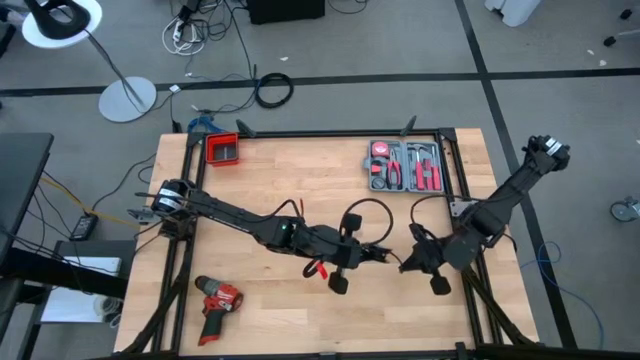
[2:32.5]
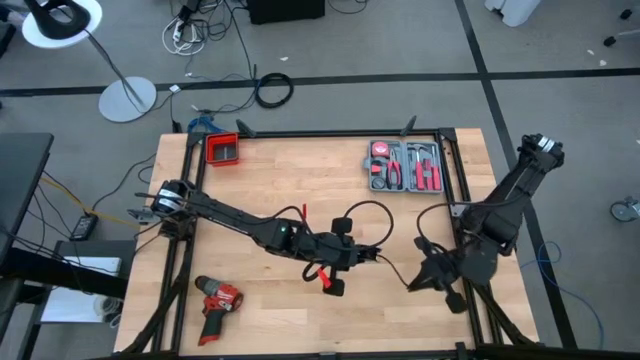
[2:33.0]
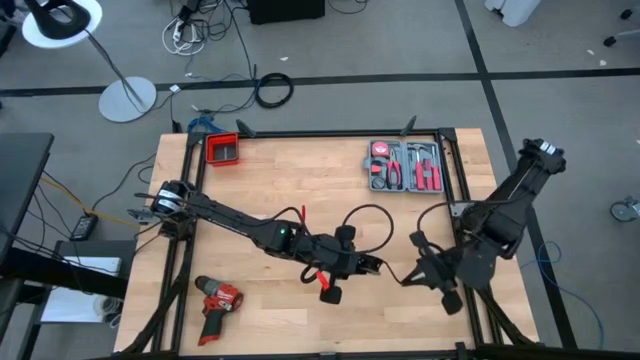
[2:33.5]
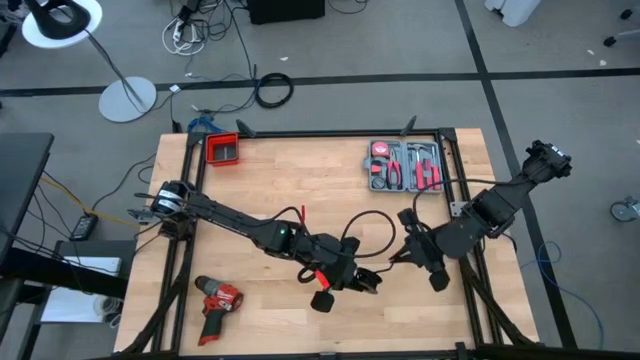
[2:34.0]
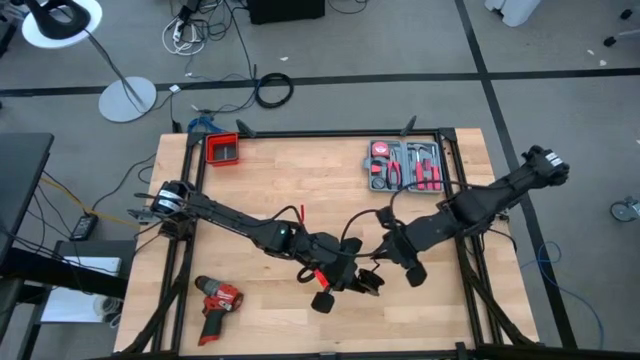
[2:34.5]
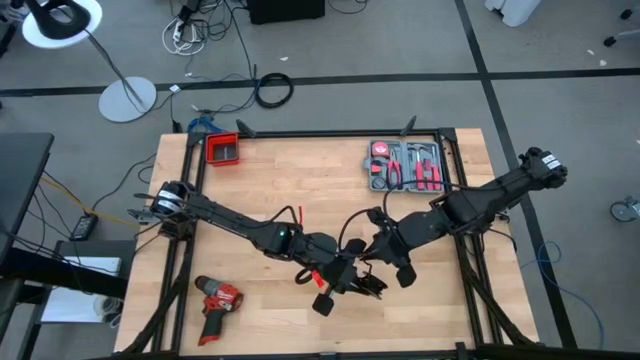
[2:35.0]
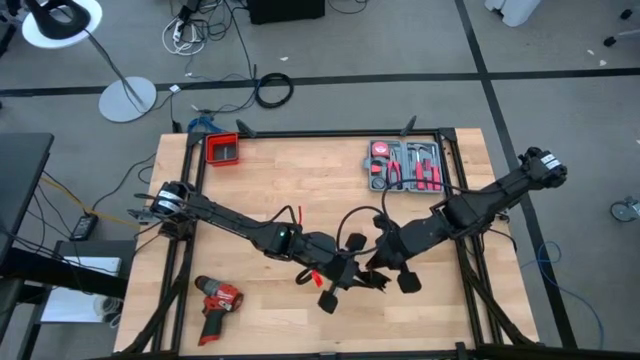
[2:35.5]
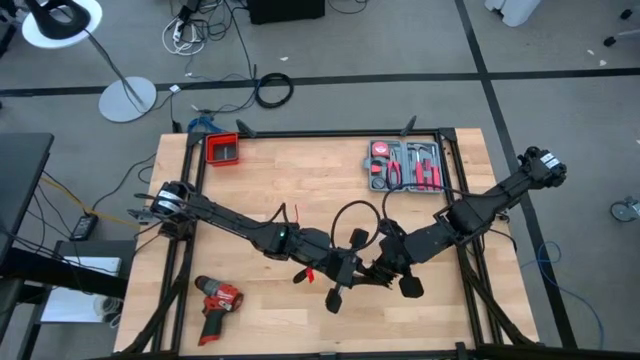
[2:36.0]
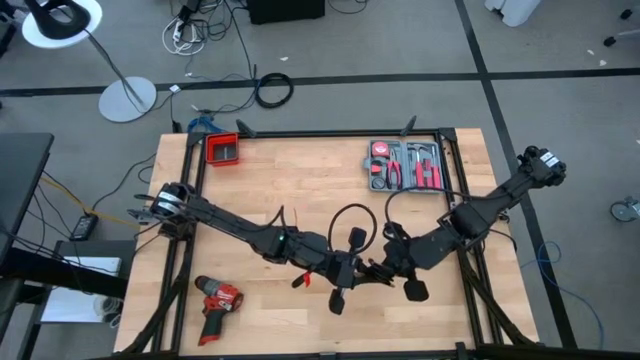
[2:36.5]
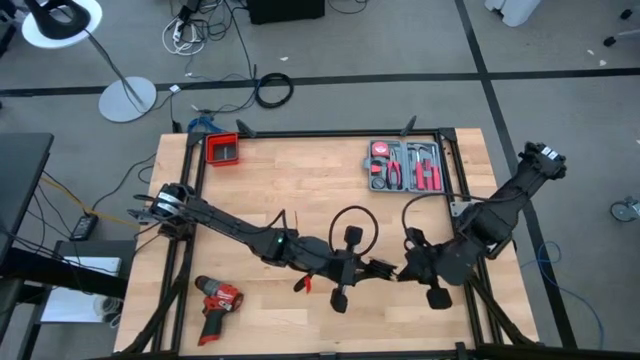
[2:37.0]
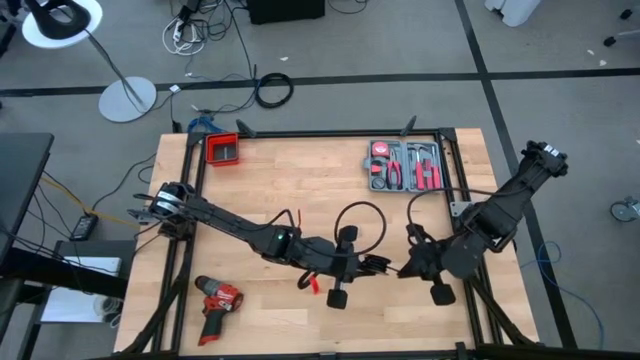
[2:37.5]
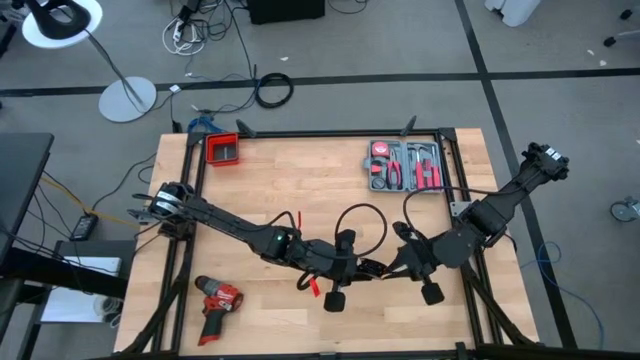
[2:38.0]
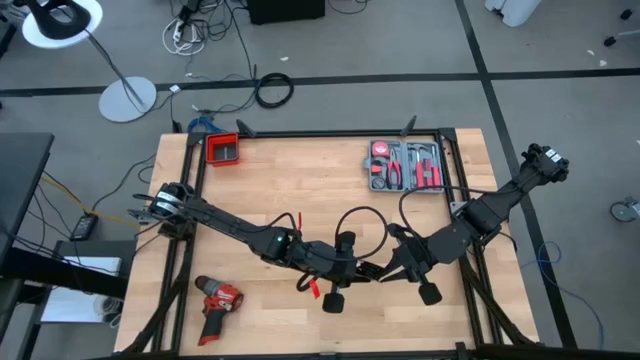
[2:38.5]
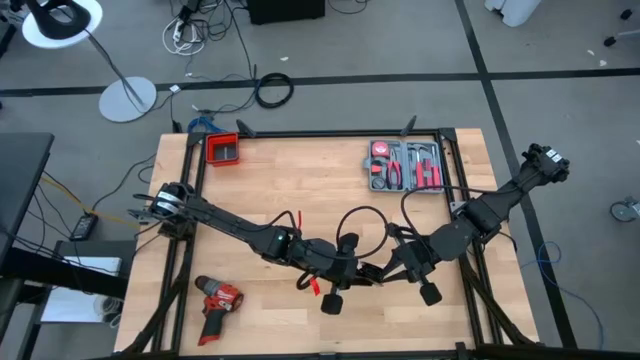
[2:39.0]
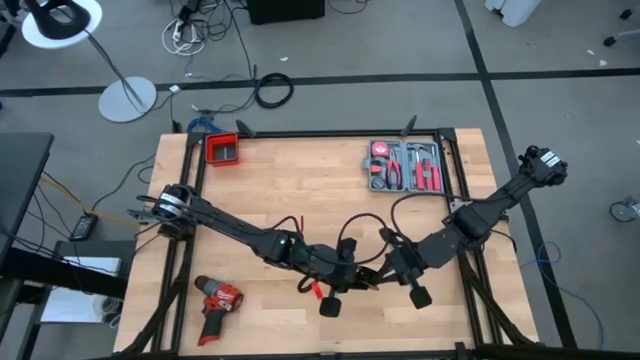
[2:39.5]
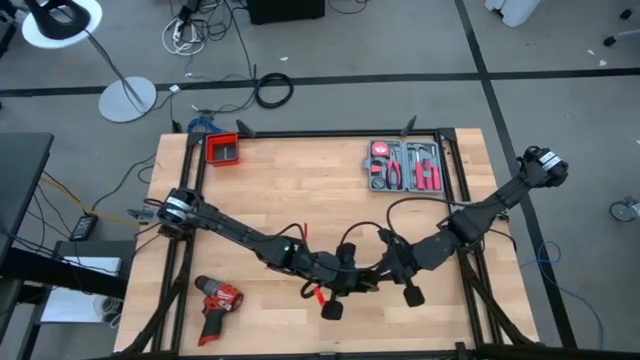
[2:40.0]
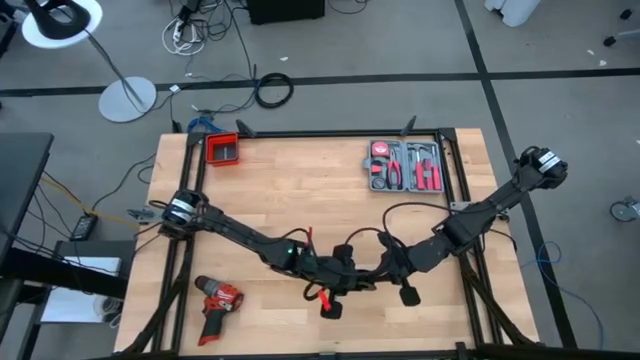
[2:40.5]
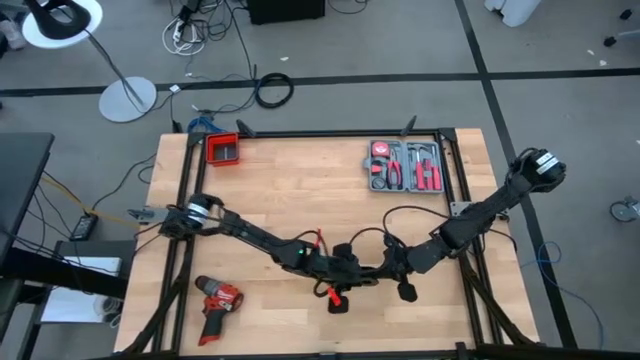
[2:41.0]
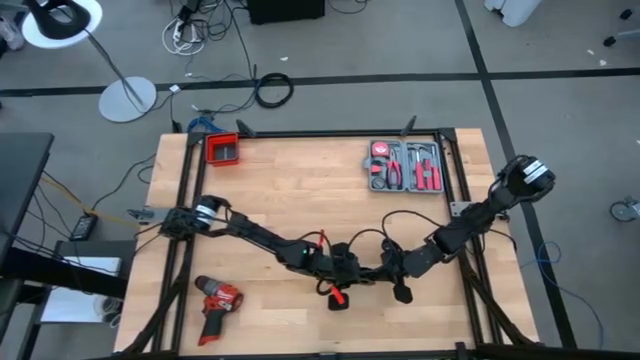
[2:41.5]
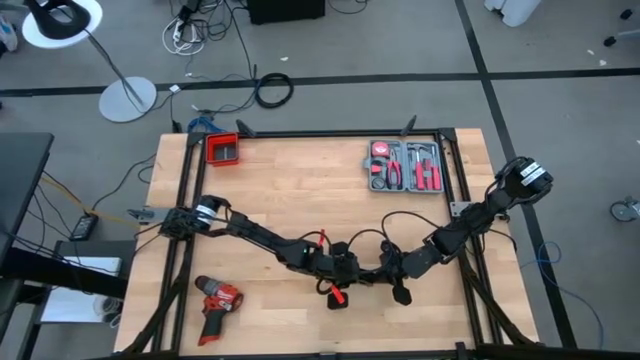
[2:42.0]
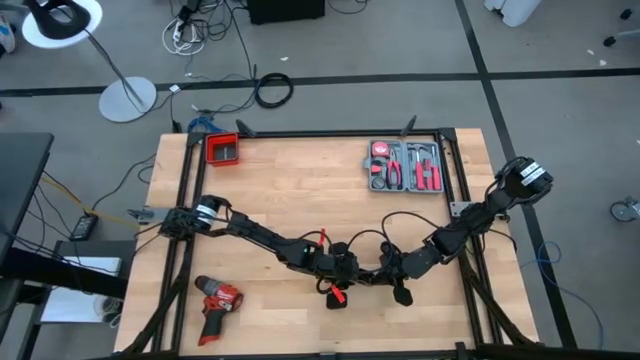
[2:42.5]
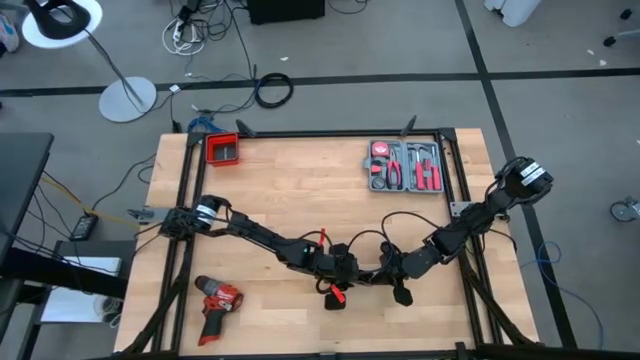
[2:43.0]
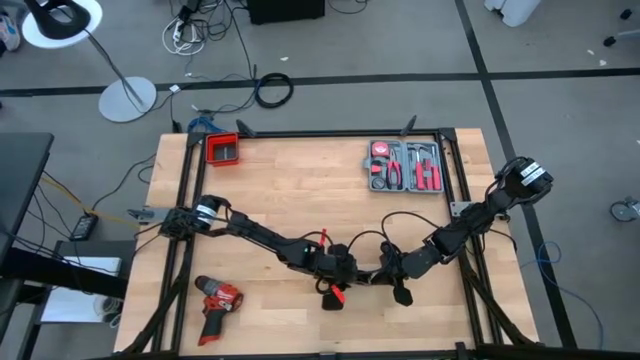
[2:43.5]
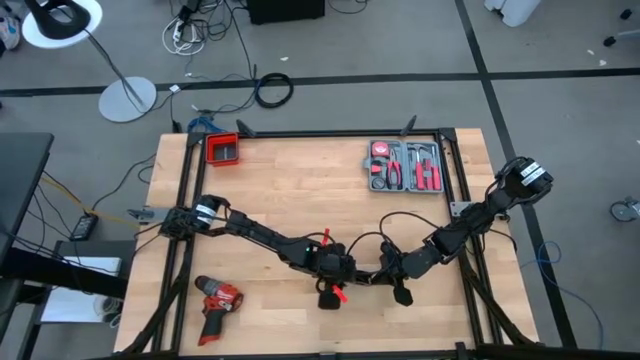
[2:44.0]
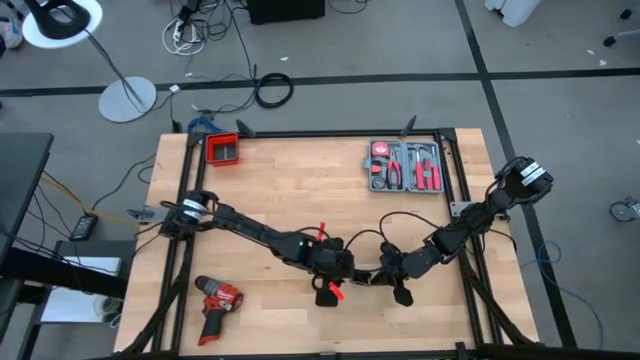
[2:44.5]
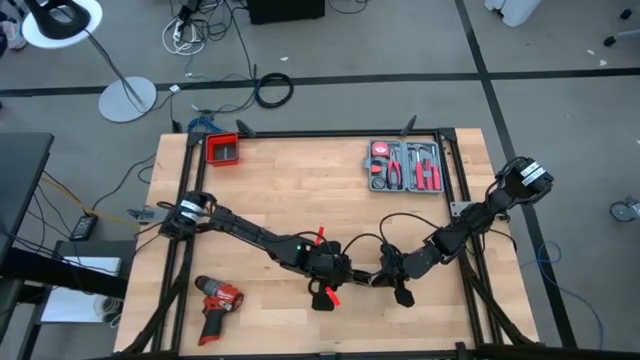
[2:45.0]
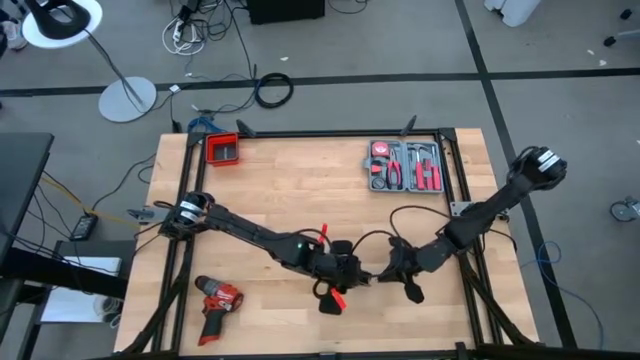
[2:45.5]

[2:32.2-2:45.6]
Task: Coil cords
Coil the black wire onto the black spool

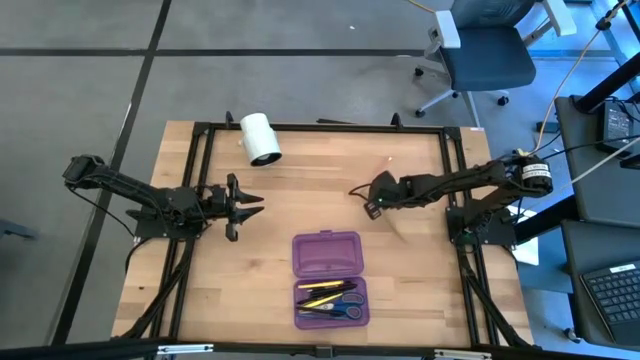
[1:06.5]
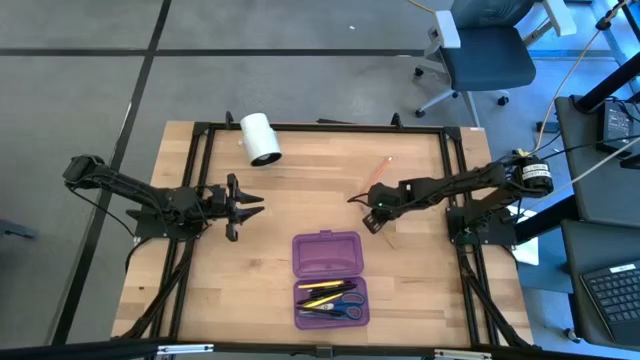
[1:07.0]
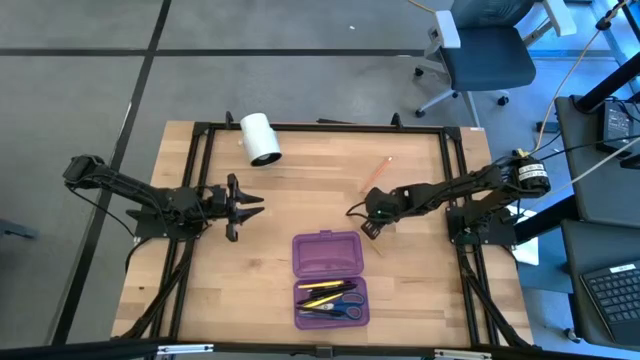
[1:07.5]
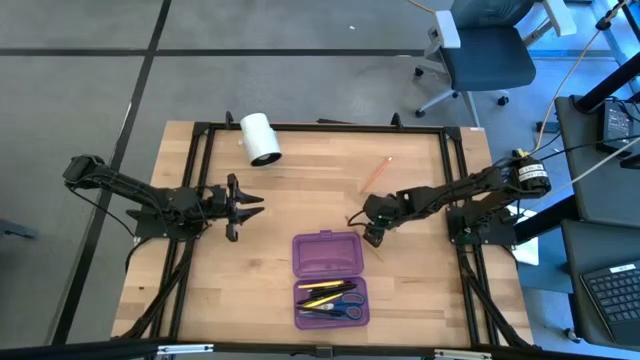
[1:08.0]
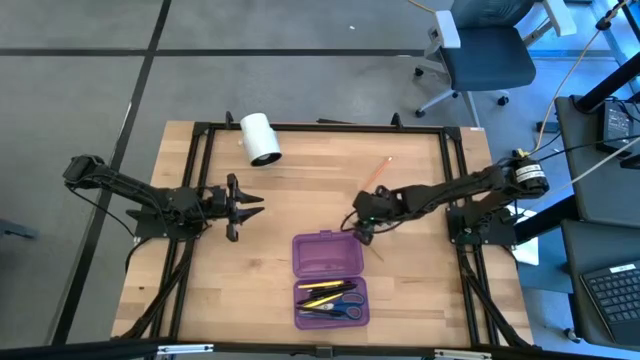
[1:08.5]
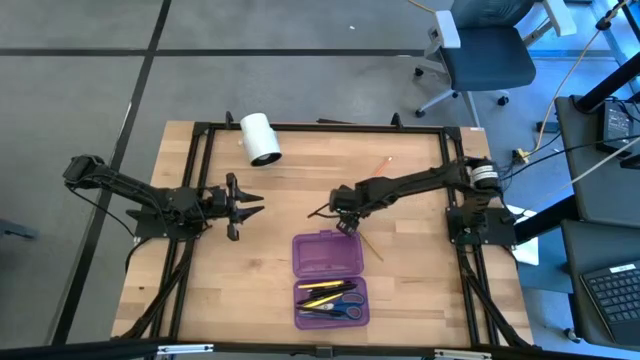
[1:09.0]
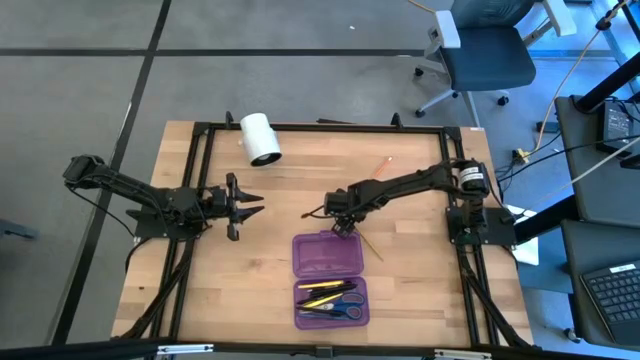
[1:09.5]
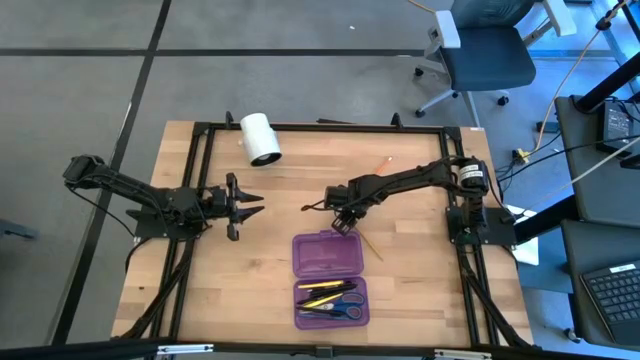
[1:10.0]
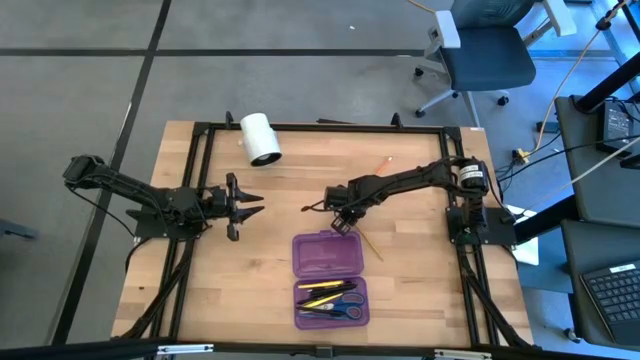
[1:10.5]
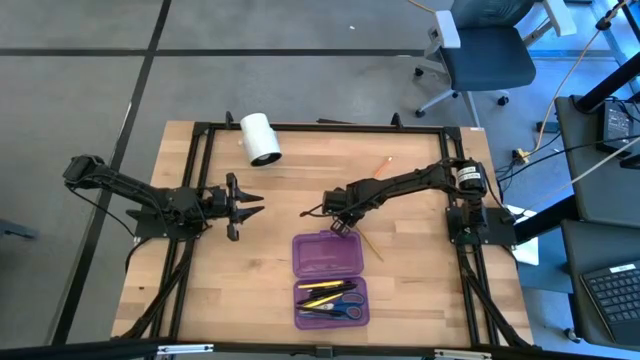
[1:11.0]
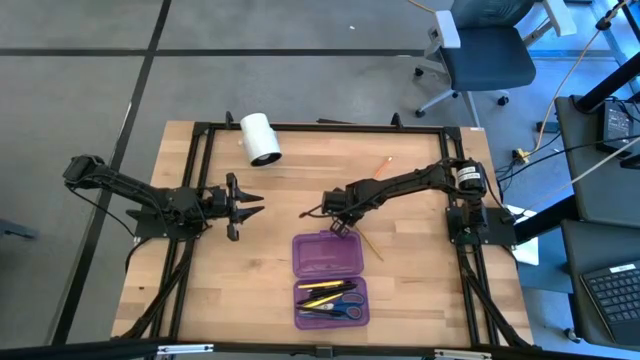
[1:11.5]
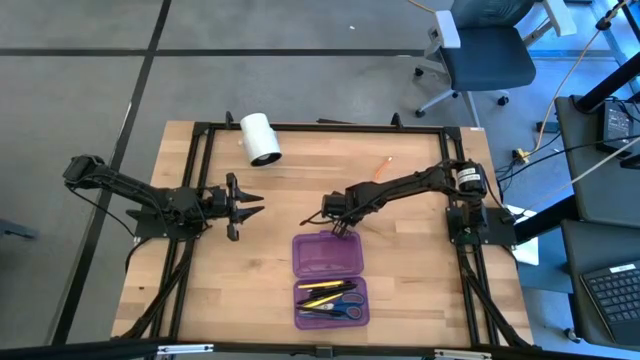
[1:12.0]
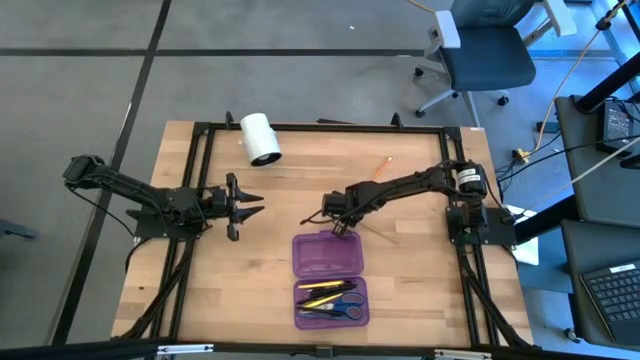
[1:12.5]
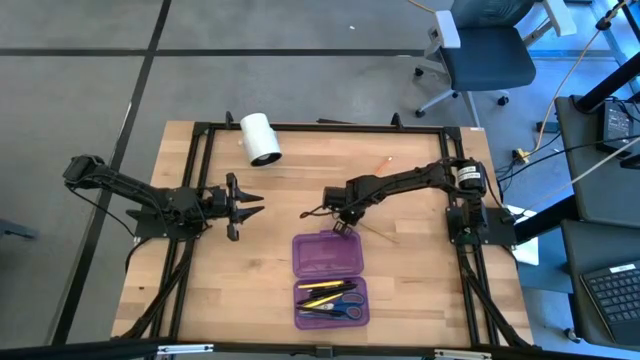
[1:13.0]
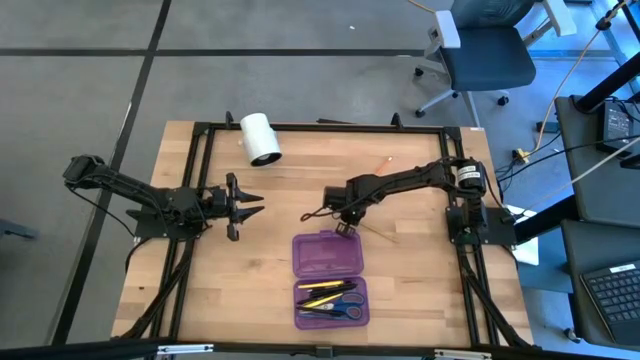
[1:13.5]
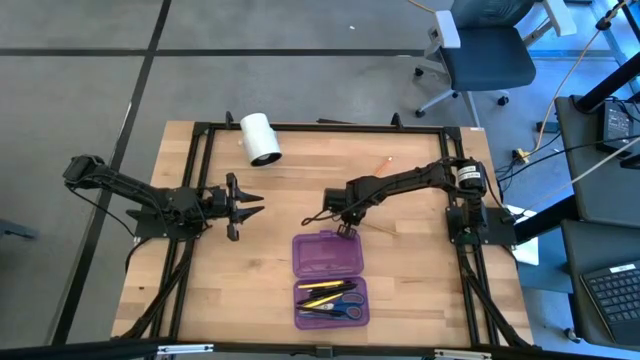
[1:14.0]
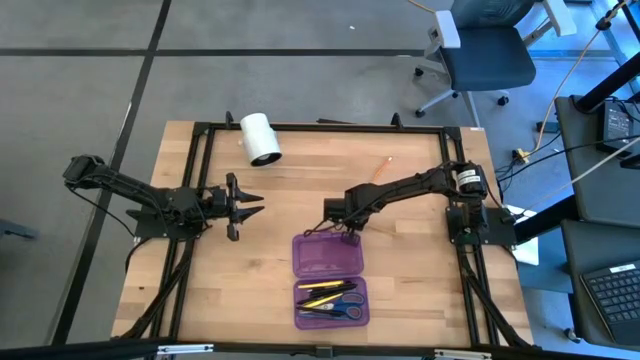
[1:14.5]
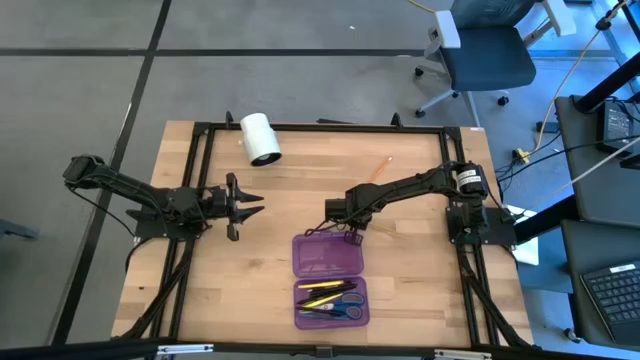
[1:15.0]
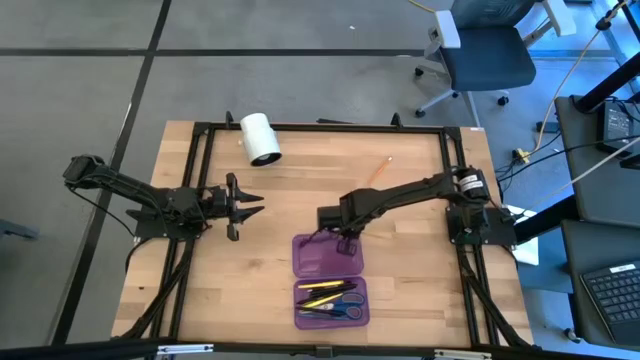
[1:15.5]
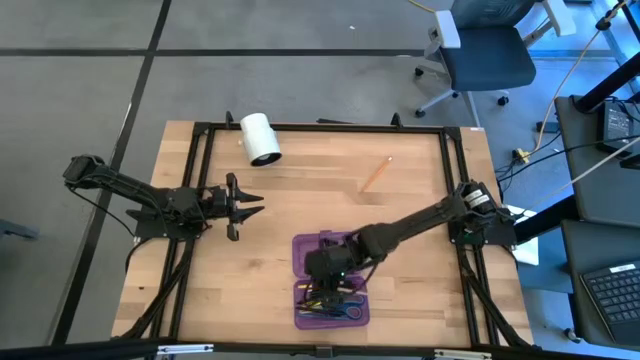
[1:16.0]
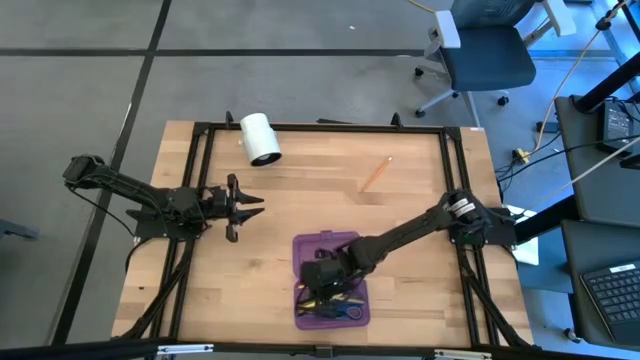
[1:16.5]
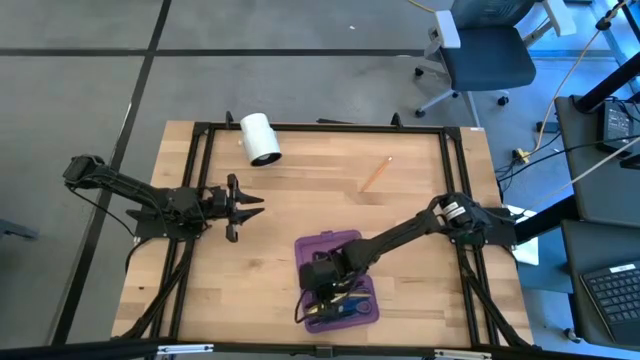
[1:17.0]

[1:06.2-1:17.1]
Task: Pick & place school supplies into a supply box
Put the yellow pencil into the purple supply box
